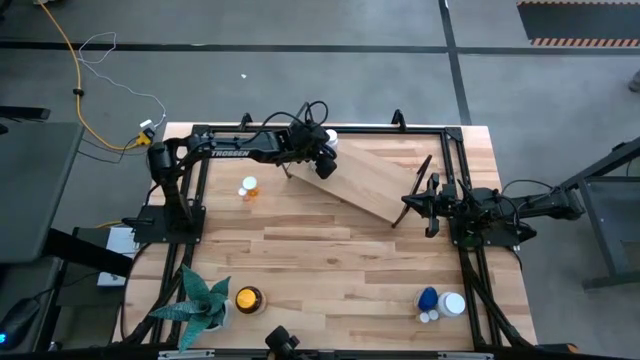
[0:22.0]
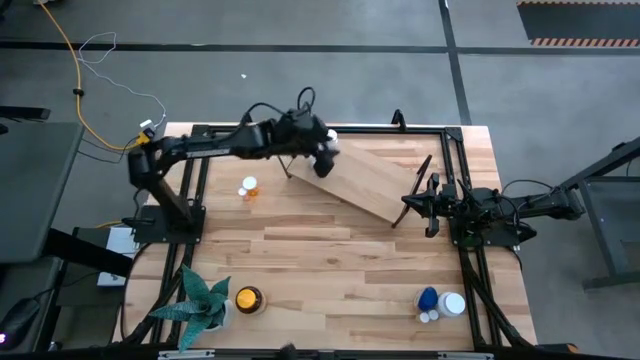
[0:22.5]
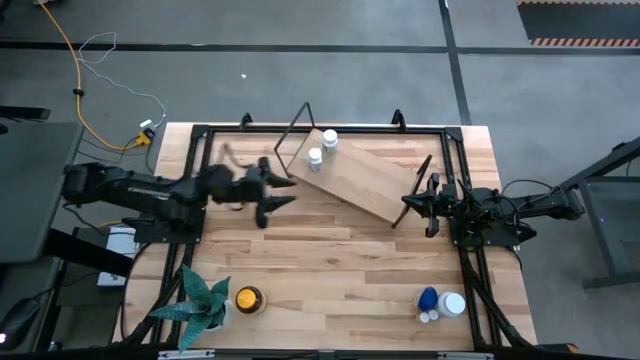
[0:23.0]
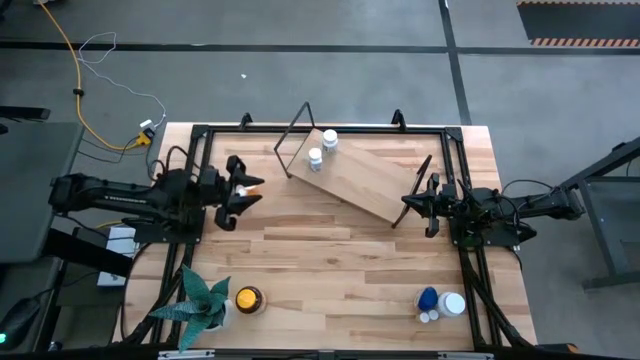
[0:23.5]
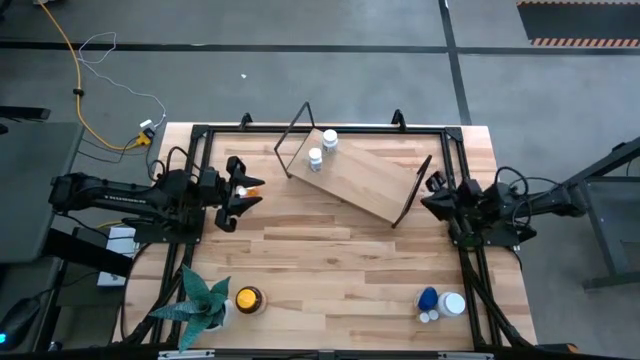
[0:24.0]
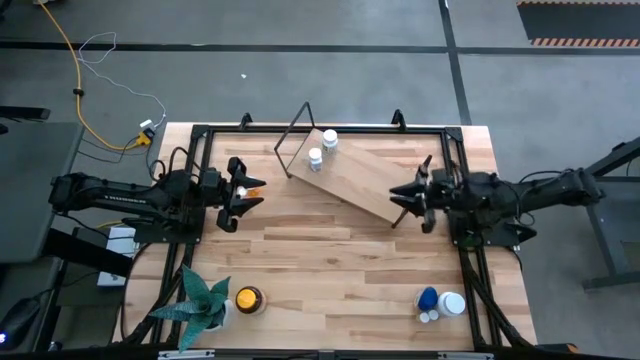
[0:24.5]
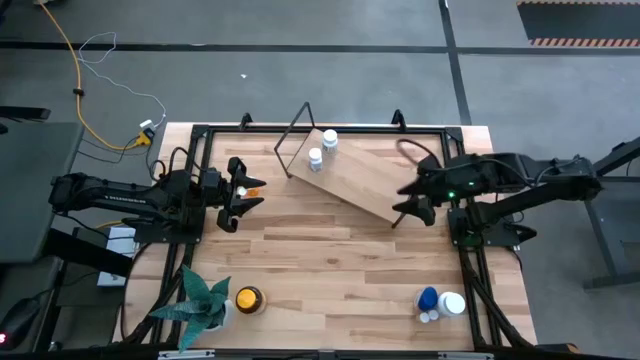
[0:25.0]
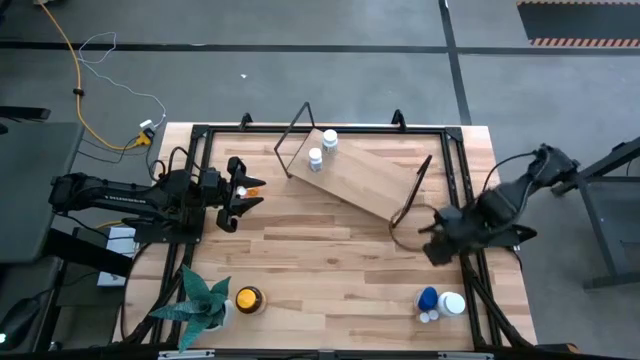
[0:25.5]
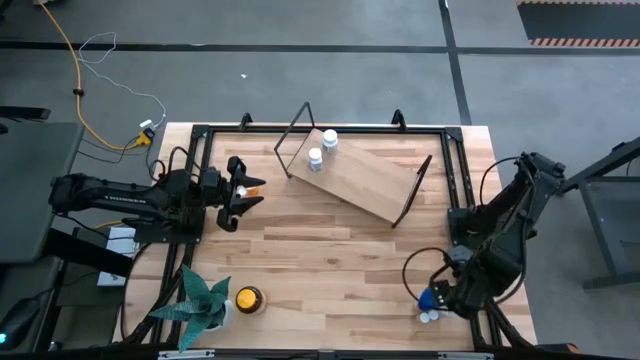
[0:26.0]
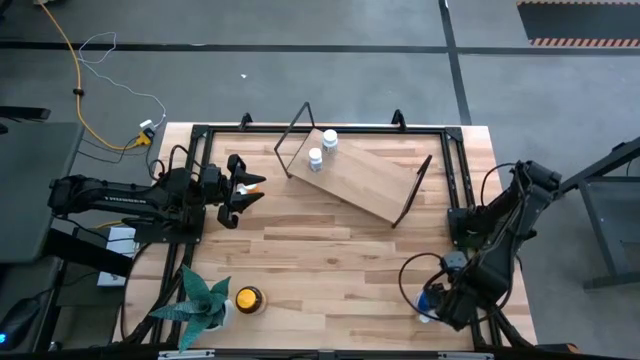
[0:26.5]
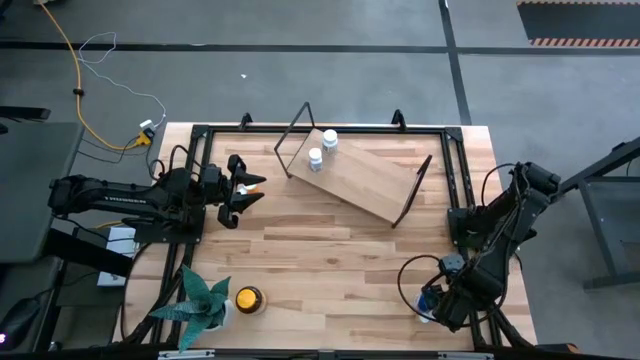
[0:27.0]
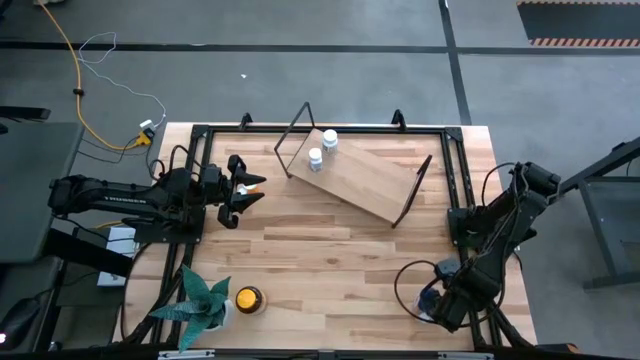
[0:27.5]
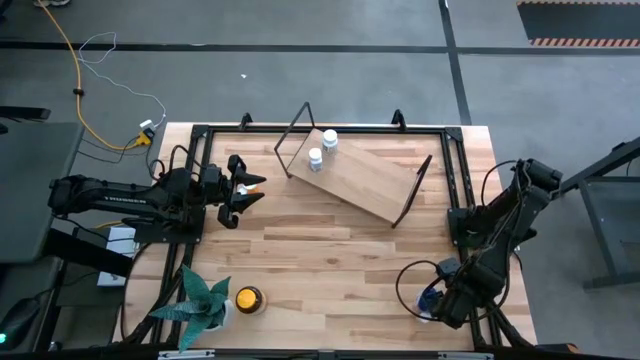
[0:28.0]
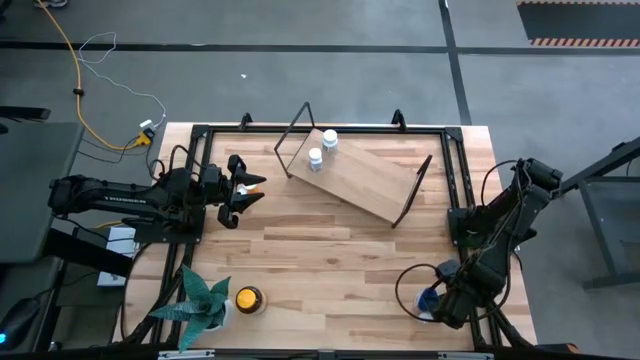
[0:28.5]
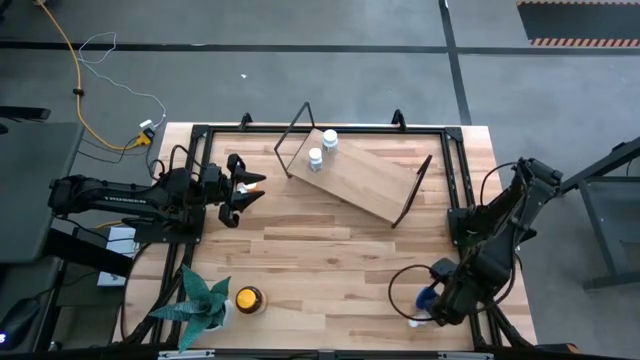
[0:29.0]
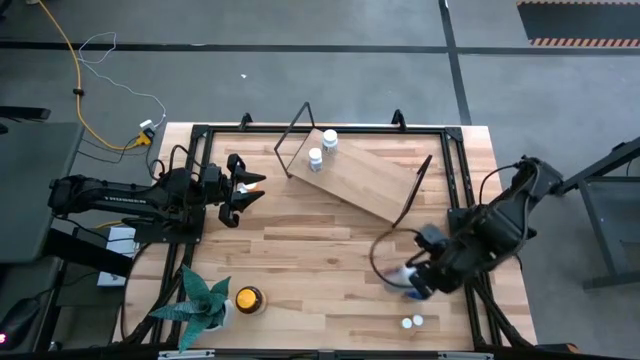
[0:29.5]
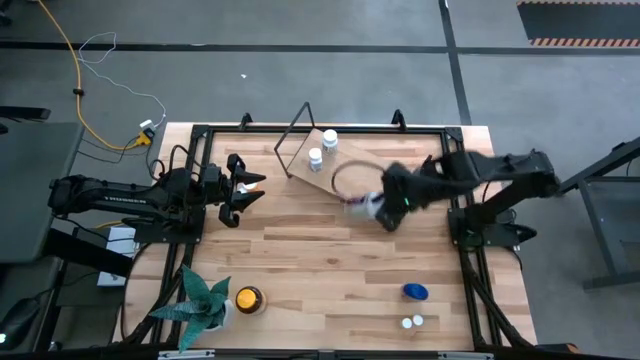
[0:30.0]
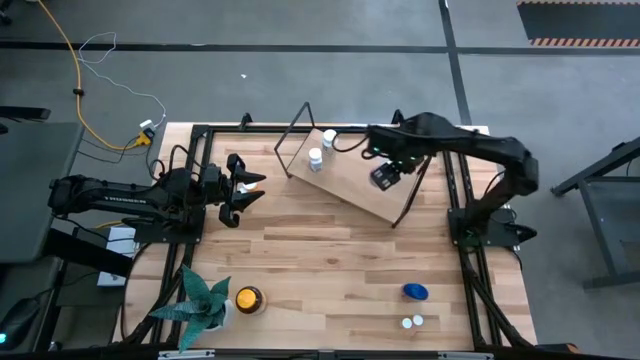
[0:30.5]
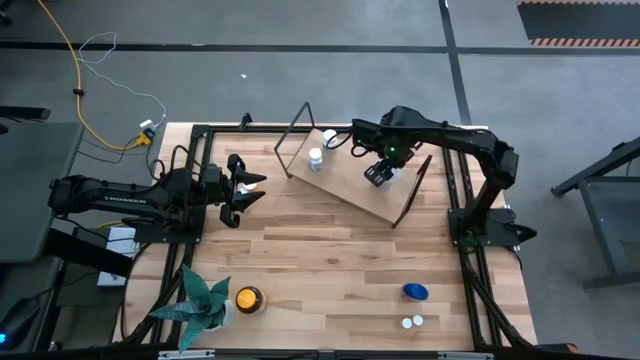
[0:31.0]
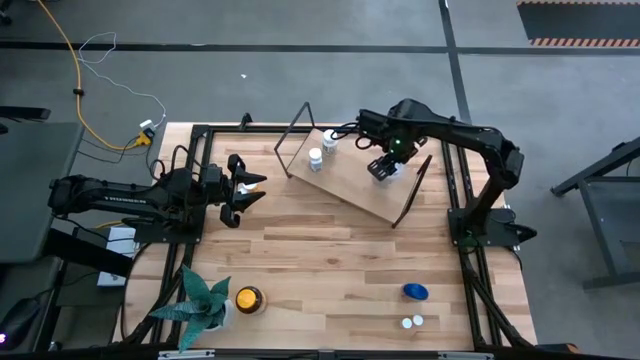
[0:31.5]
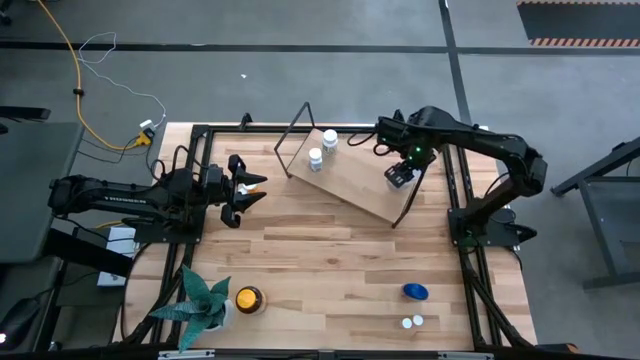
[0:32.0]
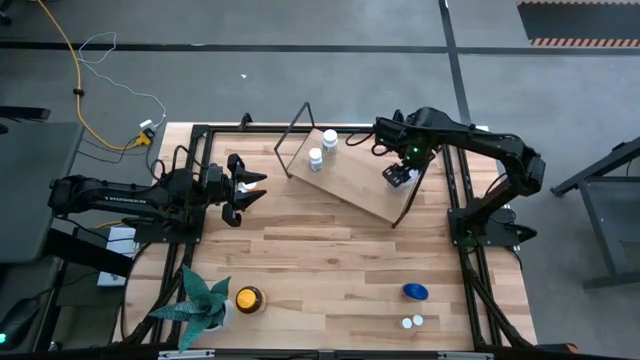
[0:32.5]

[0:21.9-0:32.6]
Task: Pick and place medicine bottles onto shelf by color
Put the white pill bottle on the shelf

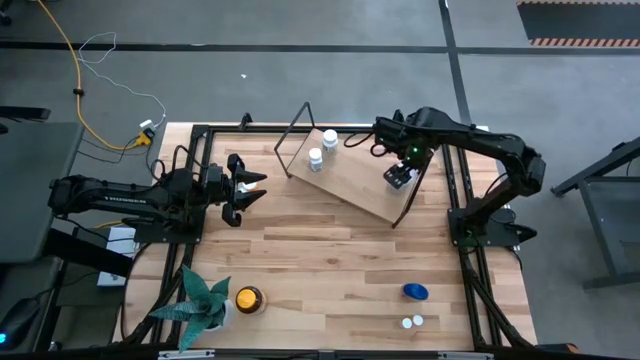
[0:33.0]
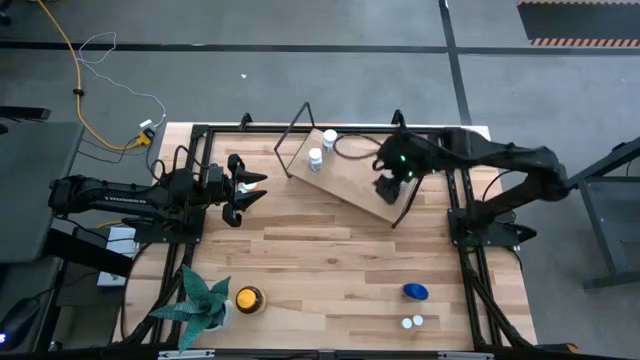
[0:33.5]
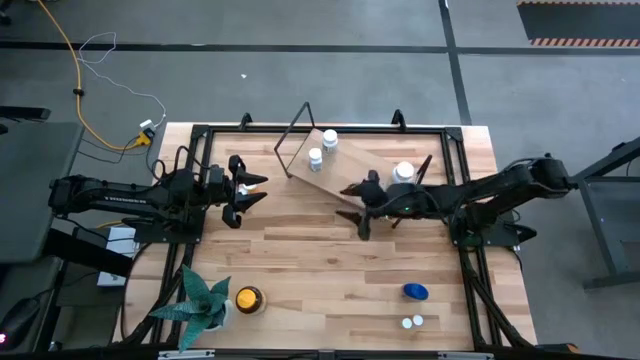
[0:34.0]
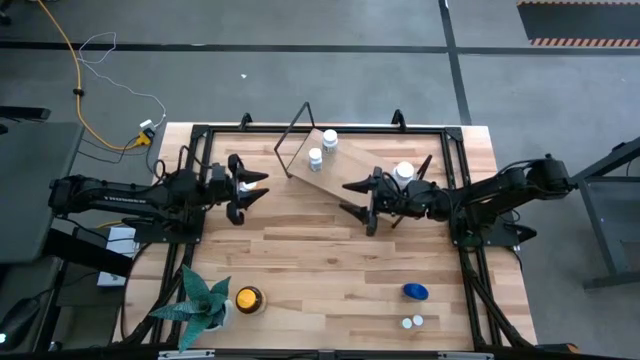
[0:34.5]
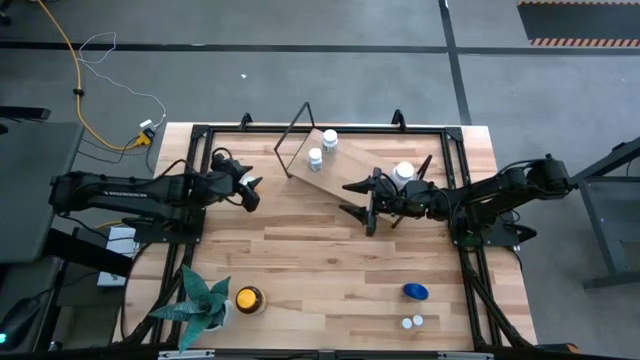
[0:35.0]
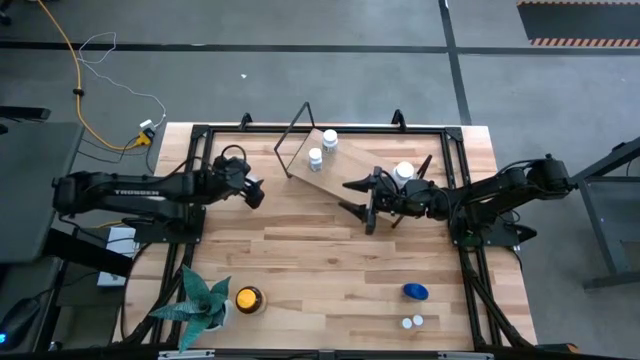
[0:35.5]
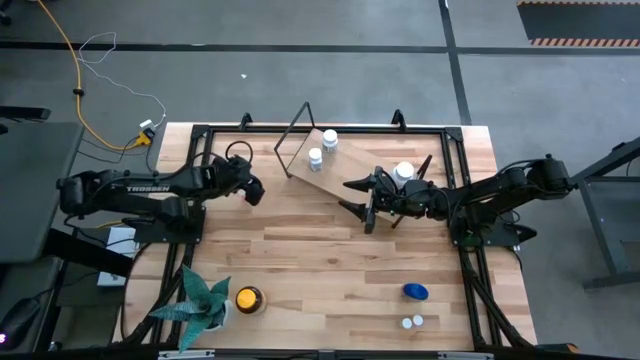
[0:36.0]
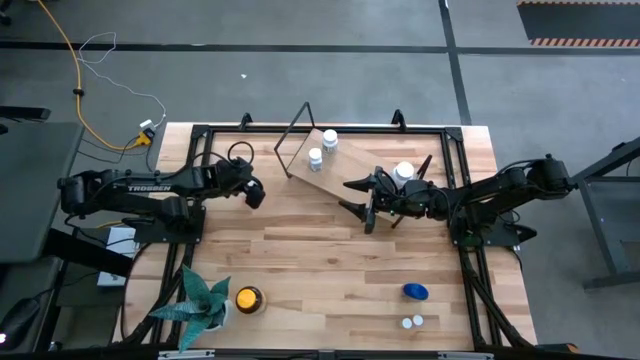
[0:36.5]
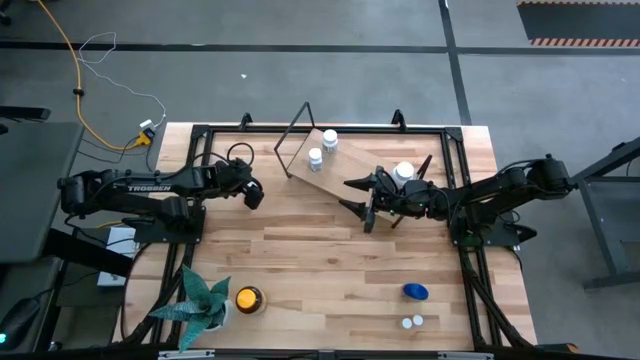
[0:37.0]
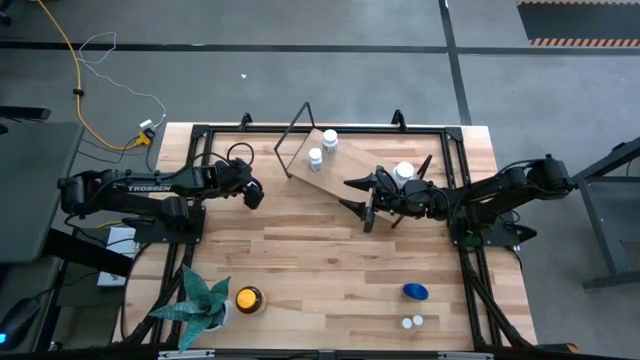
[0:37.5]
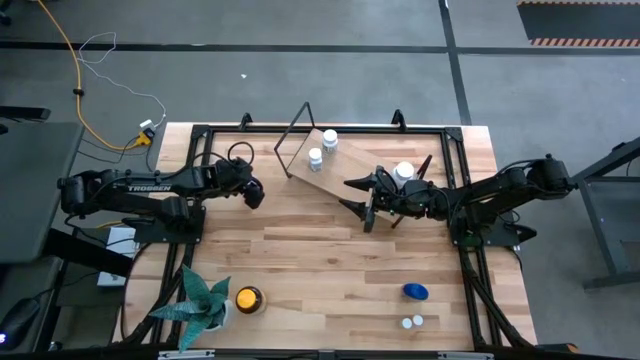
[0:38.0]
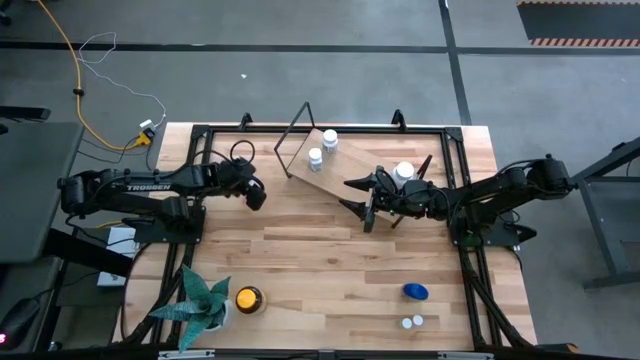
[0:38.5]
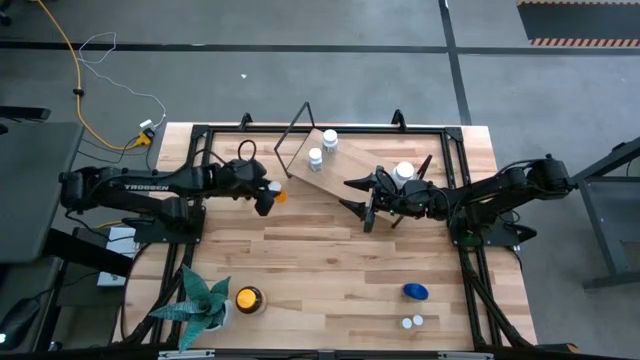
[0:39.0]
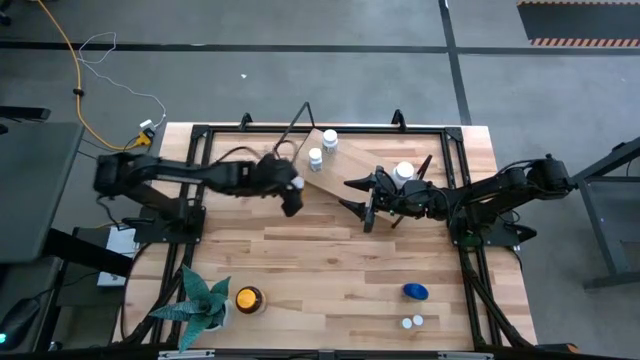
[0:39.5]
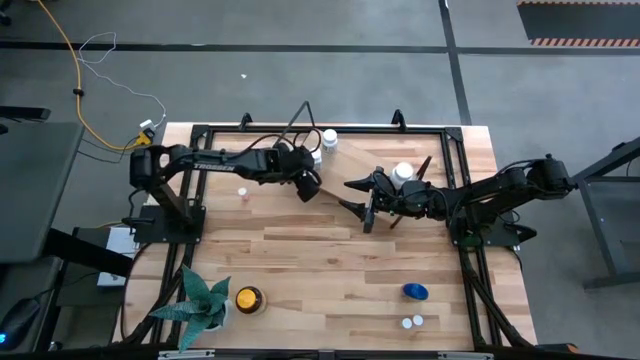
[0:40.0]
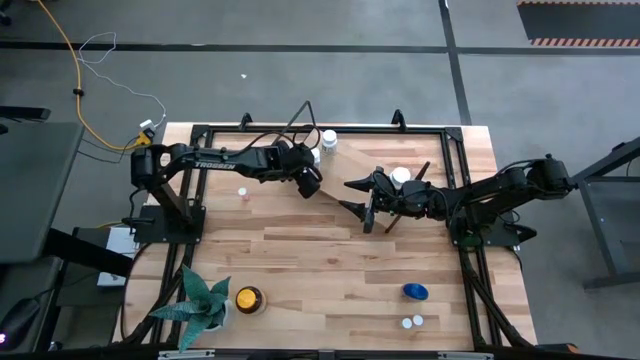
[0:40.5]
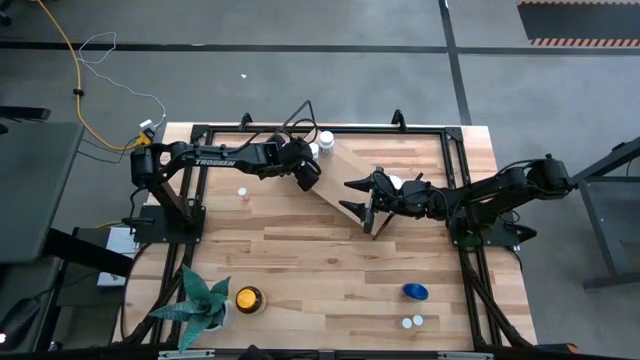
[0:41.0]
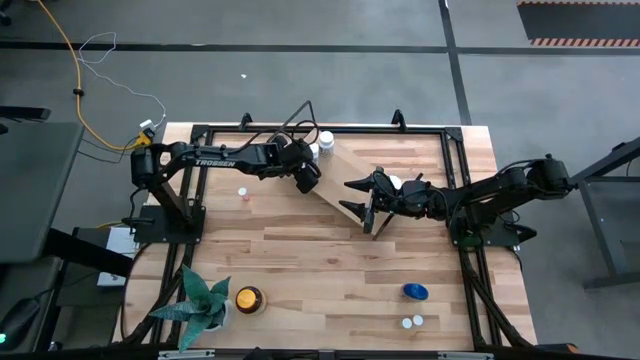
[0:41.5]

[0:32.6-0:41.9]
Put the top orange pill bottle on the shelf

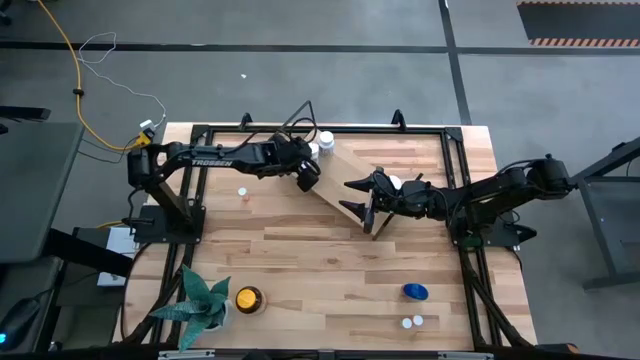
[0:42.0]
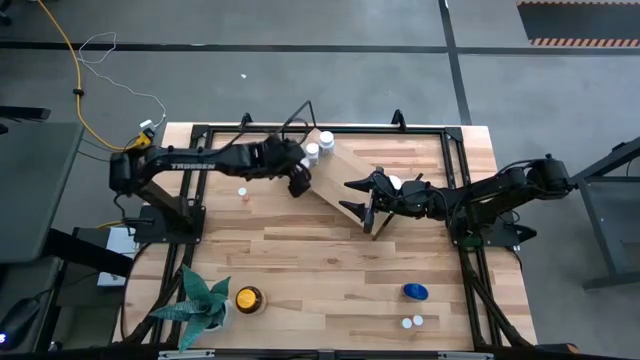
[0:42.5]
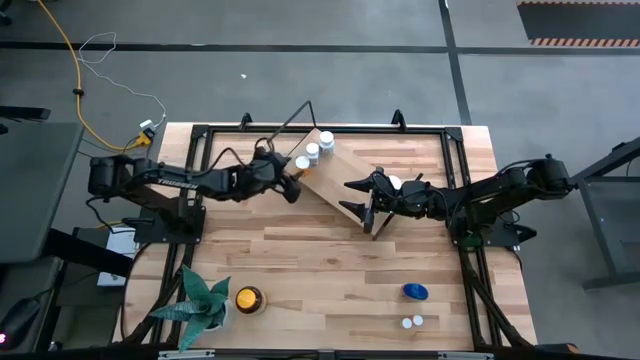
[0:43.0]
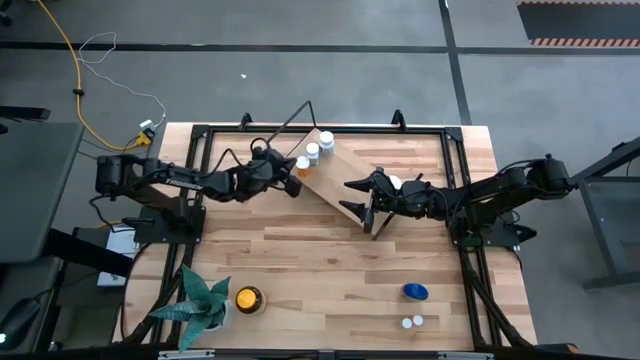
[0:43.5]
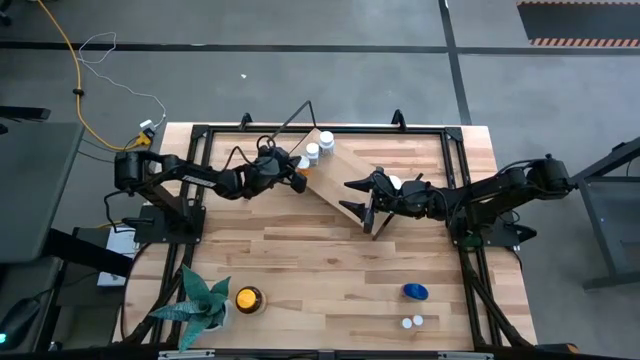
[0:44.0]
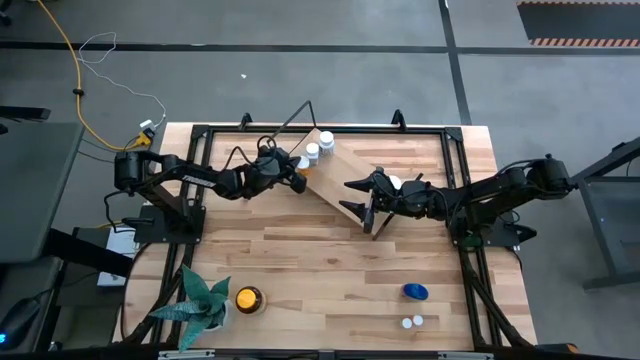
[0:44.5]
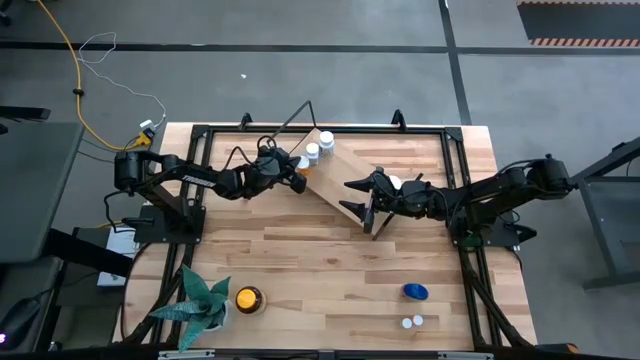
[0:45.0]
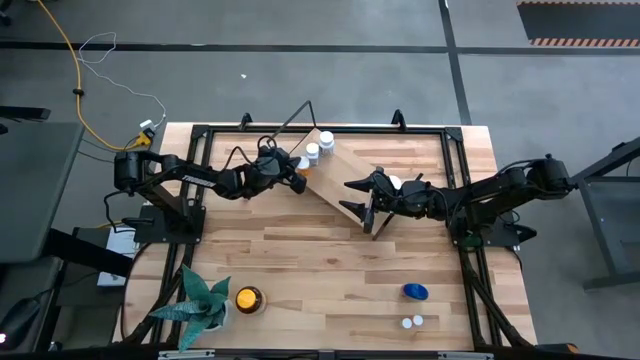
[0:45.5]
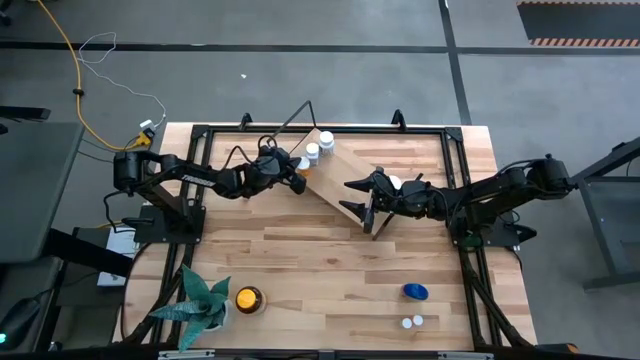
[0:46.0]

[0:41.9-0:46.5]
Adjust the orange pill bottle on the shelf
